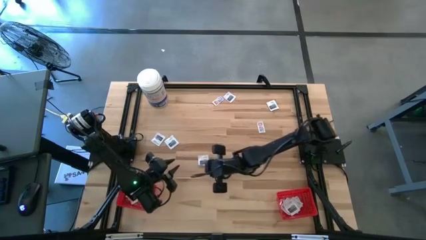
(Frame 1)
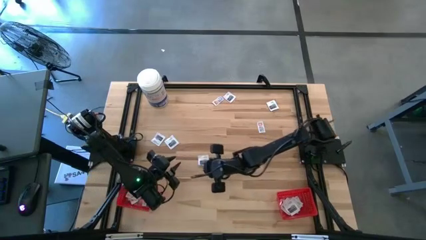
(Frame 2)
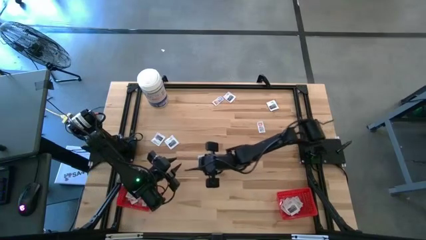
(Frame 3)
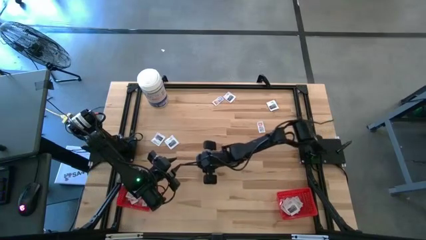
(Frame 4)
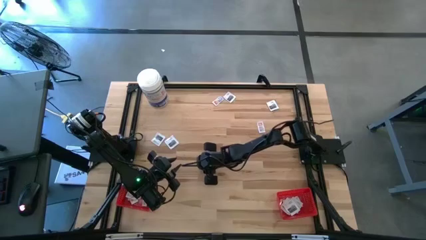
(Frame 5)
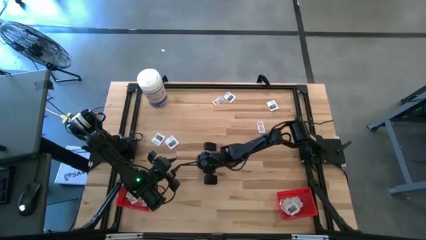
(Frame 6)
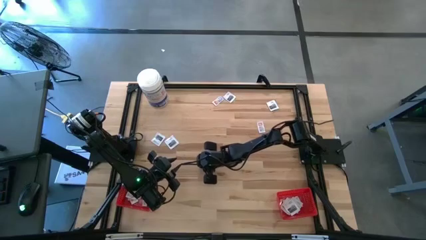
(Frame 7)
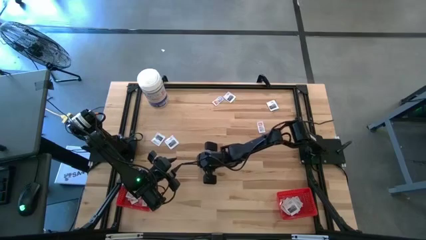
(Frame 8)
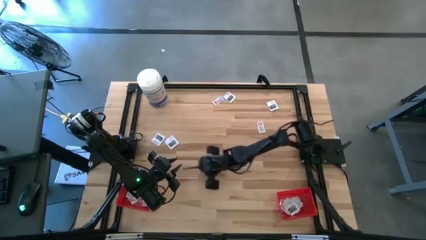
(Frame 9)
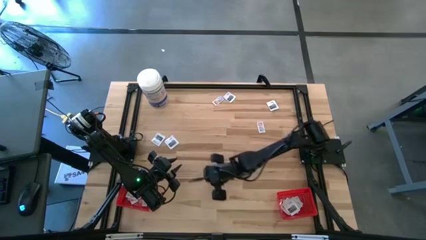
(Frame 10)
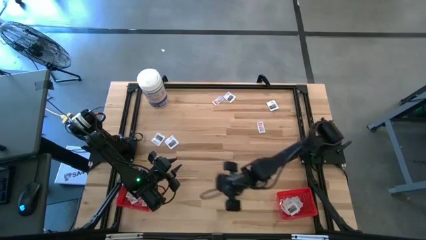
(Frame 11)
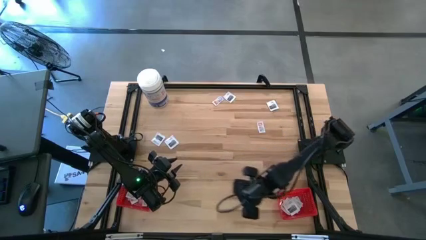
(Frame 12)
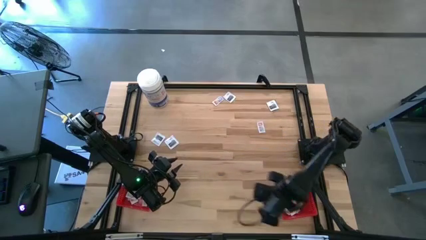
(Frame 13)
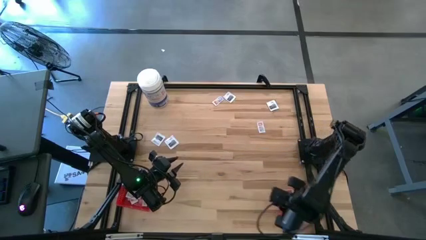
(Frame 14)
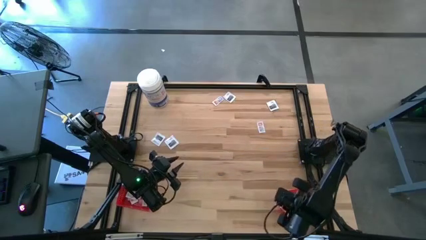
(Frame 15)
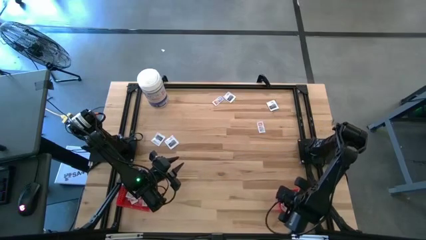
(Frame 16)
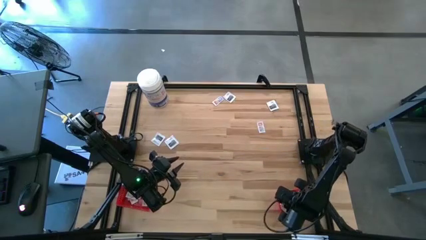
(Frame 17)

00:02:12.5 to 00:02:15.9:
Task: Pick & Place First Aid Supplies
Put the towelette pack into the right red bin

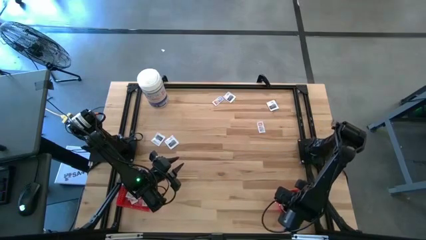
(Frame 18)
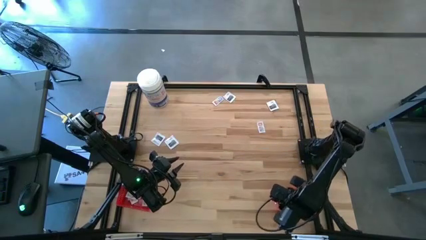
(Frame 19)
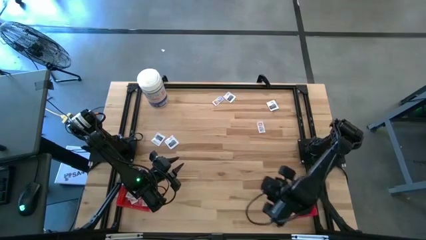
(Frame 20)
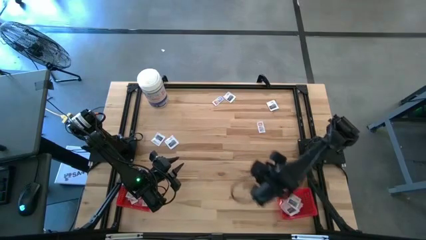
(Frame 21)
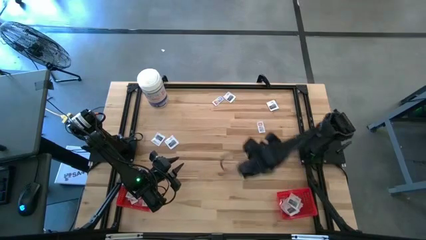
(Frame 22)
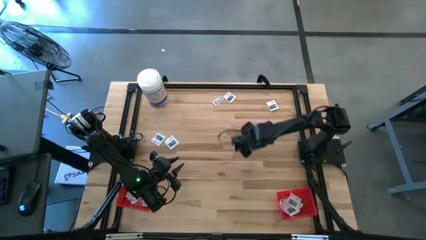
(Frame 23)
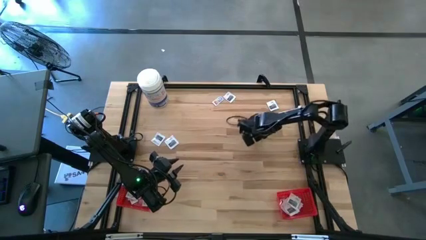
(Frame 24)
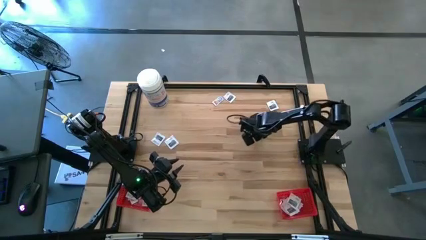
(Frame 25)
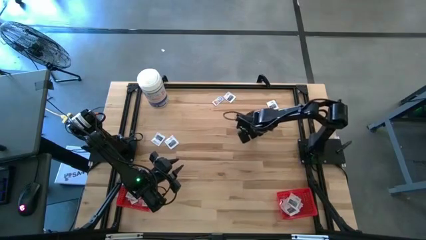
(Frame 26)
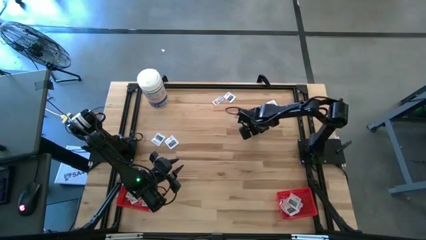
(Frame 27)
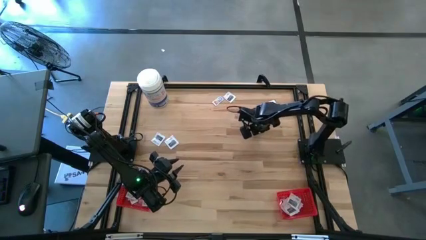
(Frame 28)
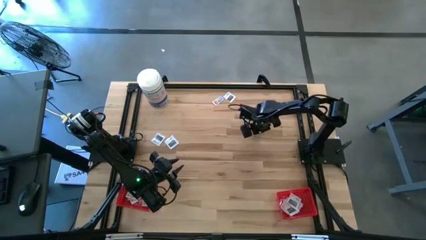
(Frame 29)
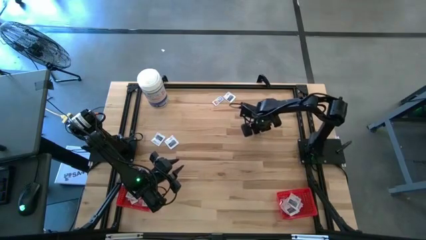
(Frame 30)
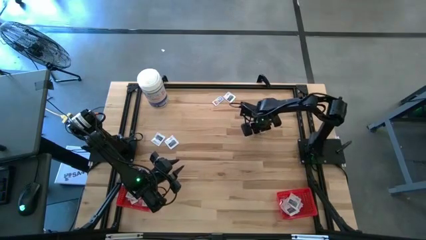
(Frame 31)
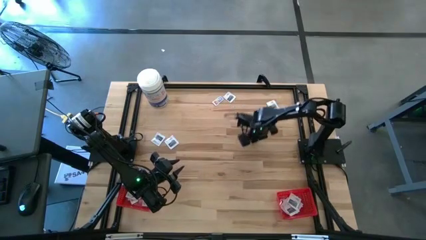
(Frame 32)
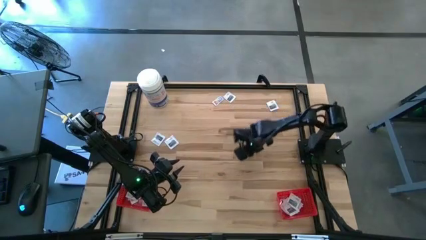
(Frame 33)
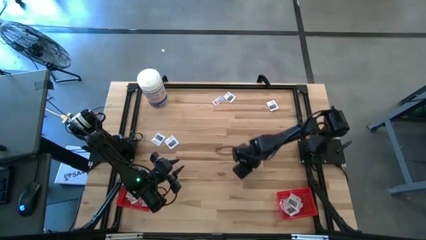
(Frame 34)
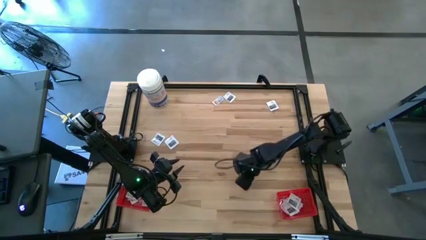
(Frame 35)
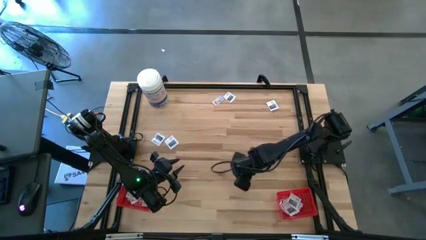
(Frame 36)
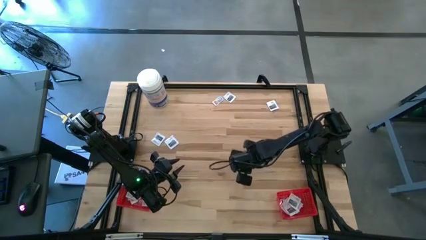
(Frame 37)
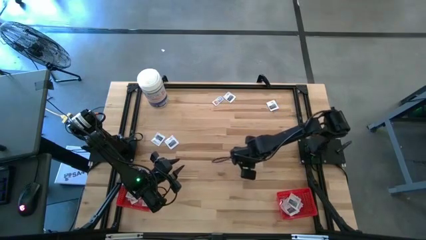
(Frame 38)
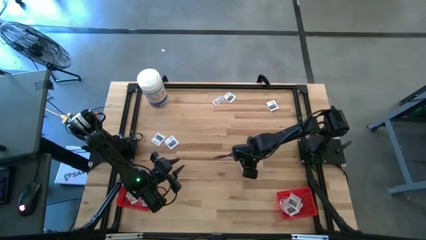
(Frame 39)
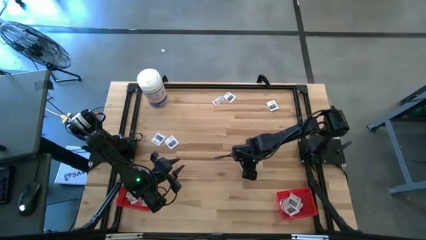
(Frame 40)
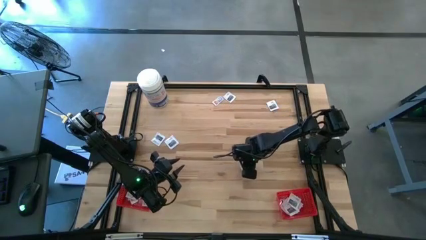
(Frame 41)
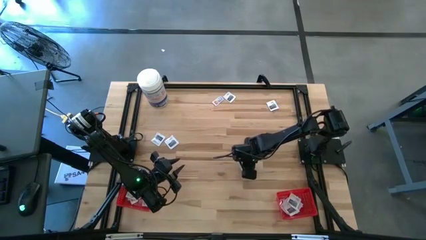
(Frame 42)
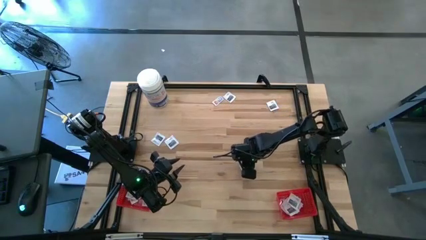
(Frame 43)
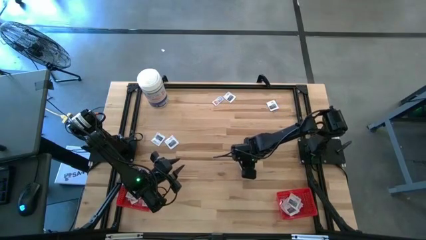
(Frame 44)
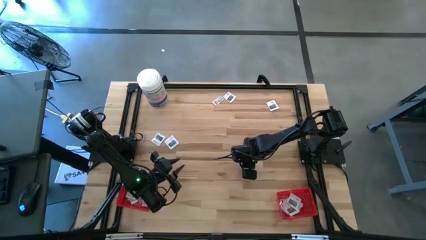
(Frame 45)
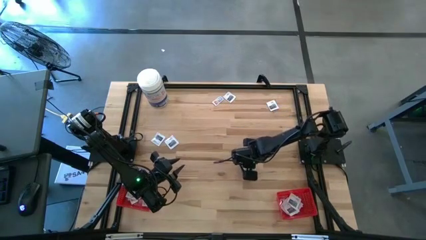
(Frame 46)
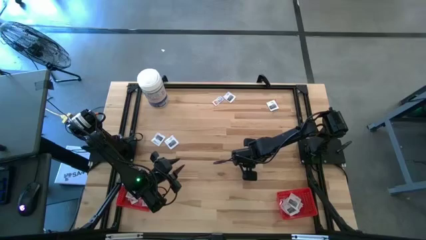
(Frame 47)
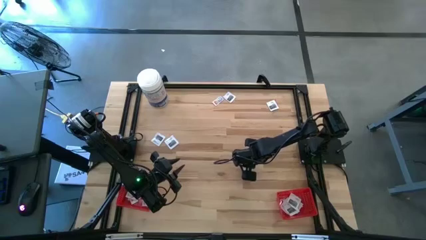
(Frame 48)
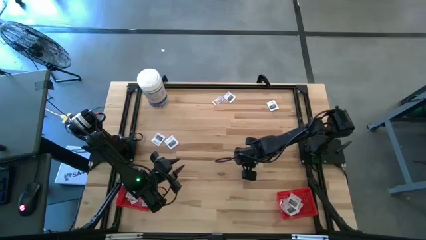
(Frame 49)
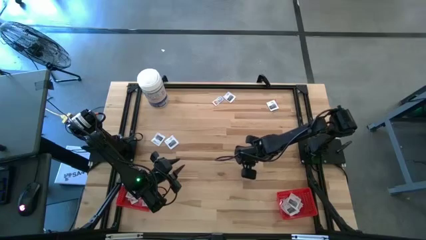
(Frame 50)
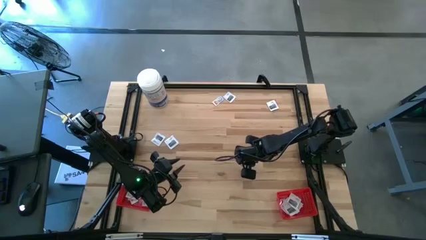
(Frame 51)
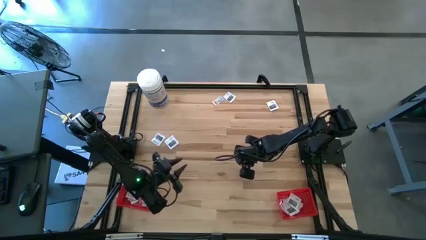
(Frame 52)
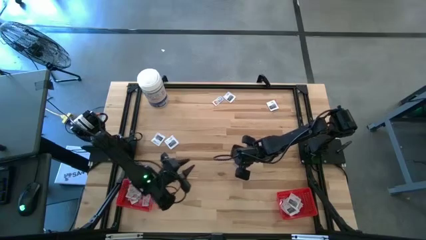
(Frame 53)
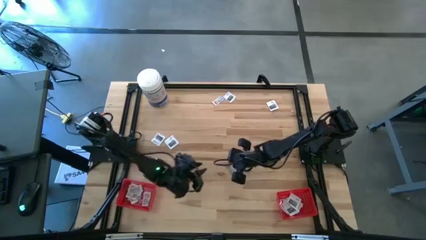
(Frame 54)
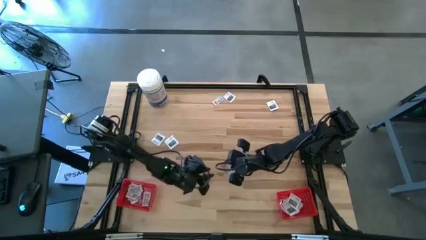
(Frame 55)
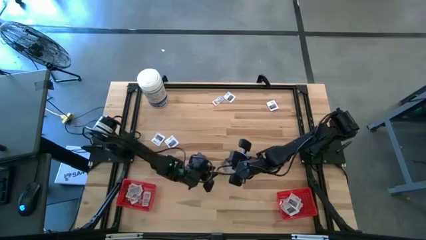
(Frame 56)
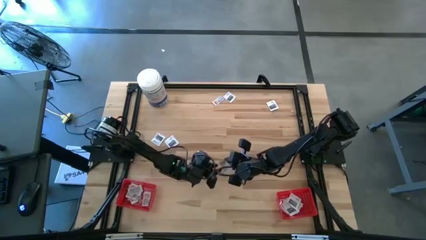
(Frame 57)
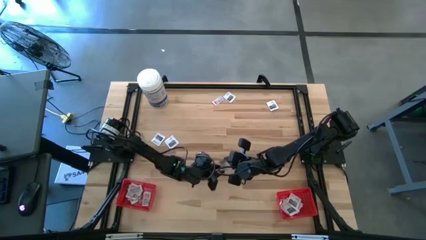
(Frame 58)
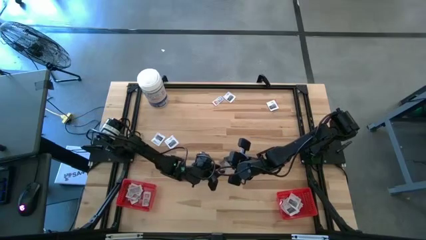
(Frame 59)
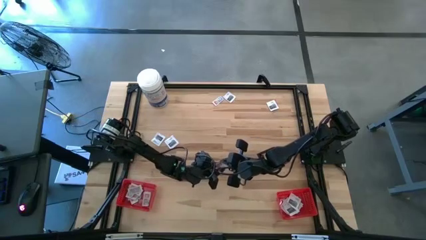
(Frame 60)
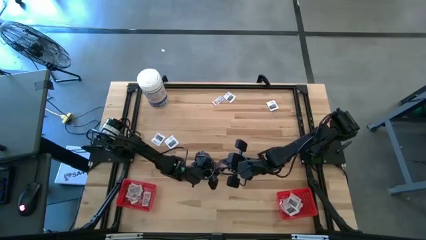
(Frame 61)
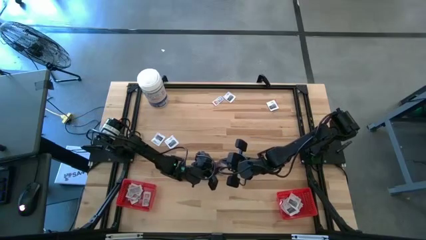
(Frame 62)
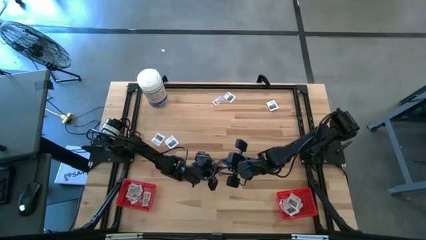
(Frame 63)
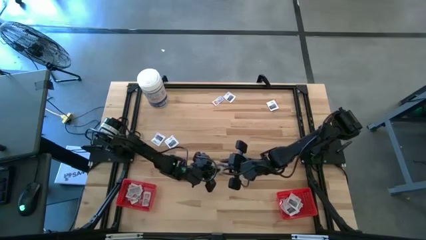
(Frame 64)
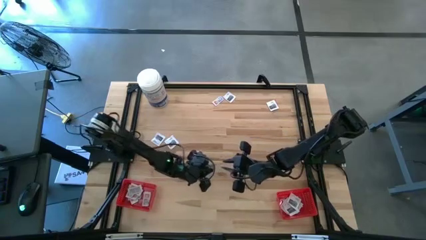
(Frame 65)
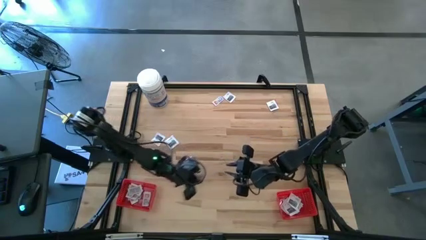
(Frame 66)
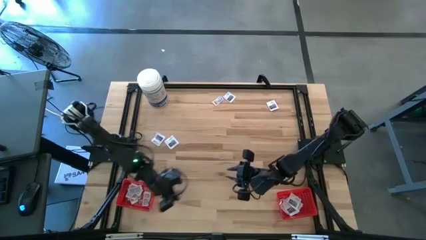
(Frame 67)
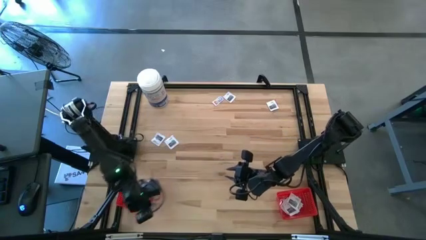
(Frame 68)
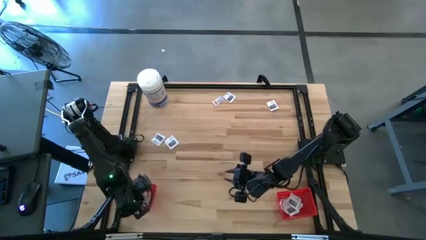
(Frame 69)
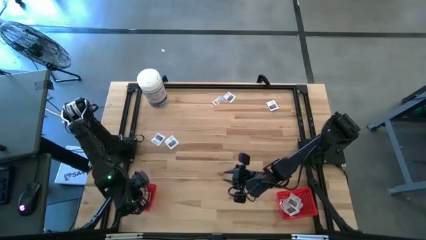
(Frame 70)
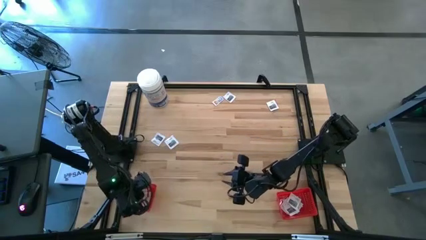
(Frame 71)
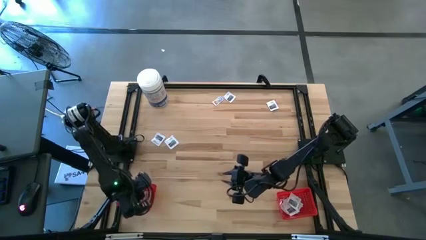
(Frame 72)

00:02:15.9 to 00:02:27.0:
Put the ointment pack into the left red bin

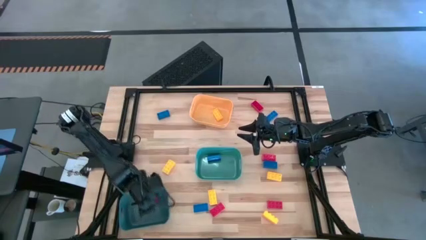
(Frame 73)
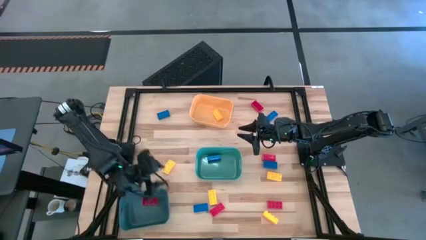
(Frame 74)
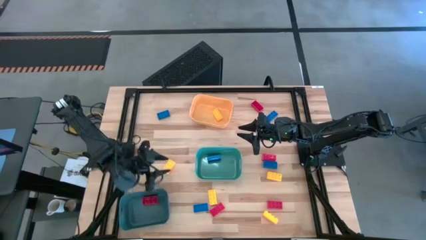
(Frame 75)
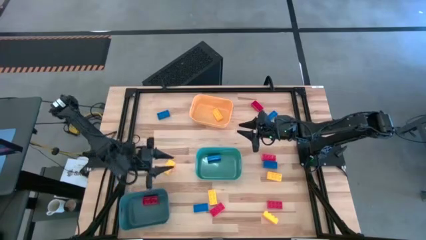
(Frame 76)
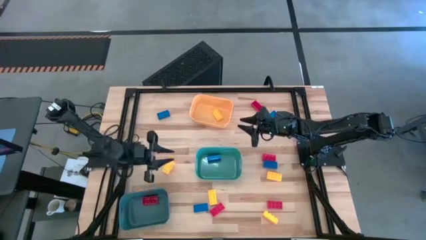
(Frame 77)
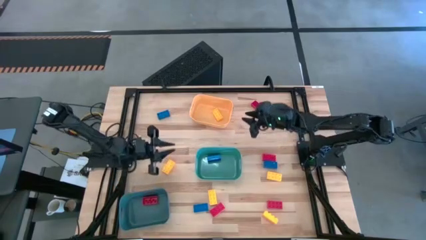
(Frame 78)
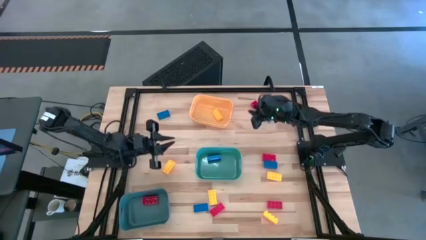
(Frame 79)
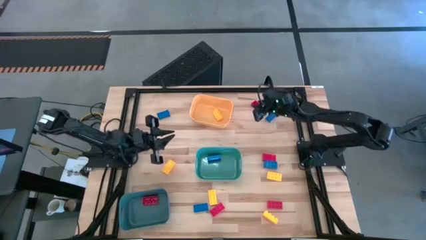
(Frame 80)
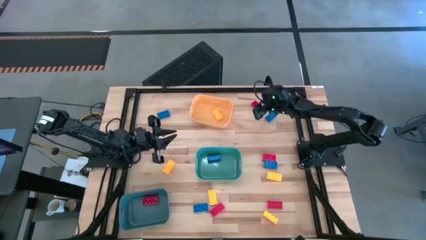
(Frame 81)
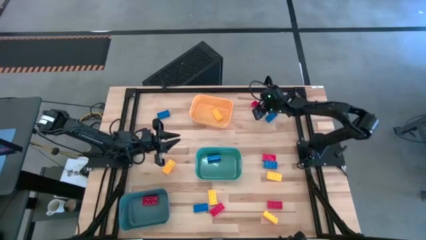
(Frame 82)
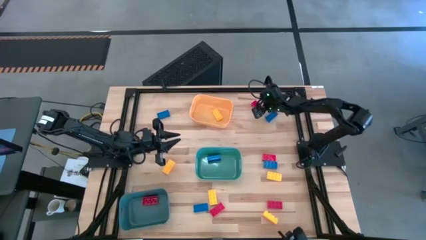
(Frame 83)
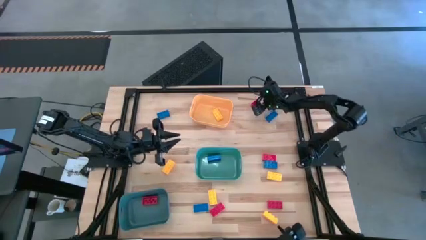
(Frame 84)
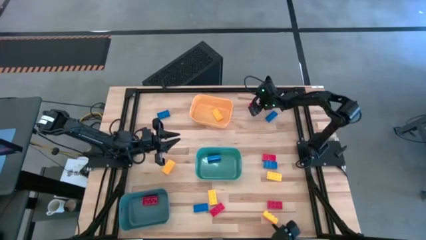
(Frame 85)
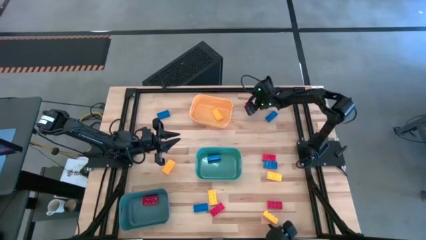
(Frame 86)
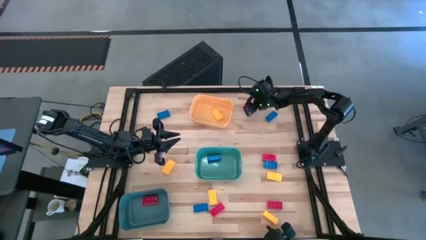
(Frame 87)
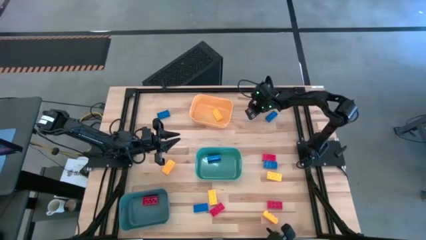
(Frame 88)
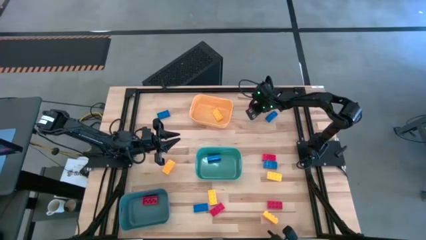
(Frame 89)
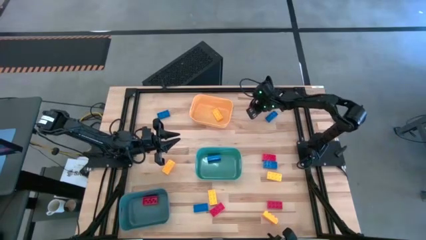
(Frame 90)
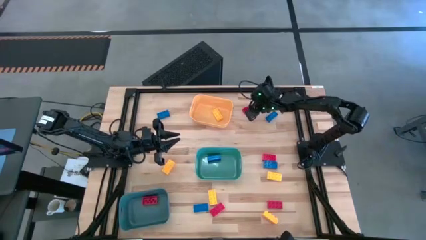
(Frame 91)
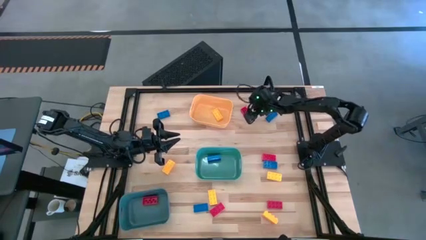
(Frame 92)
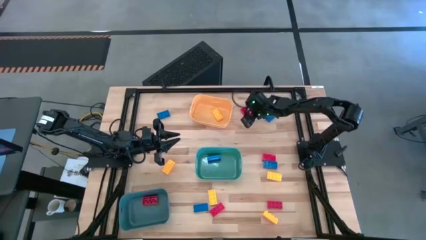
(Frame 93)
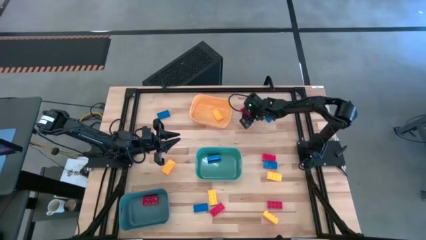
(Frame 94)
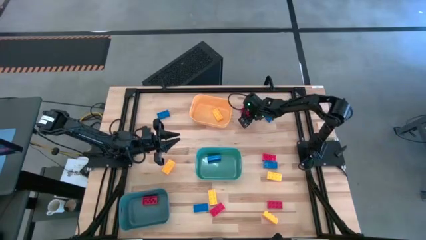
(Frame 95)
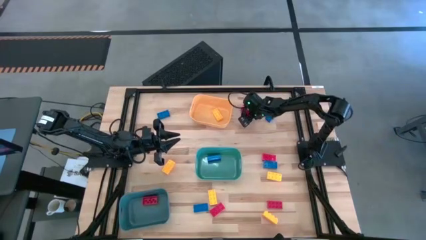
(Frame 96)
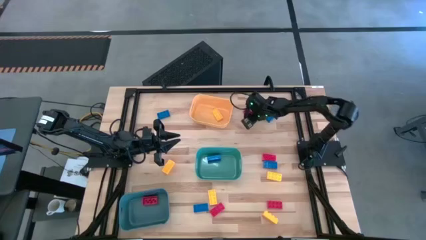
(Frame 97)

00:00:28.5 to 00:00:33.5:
Task: Sort & place blocks by color
Put the red game piece into the blue bin
